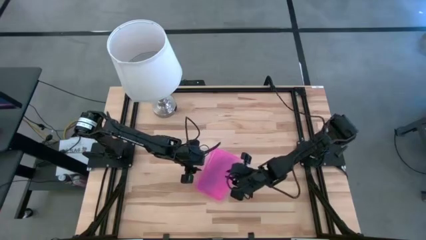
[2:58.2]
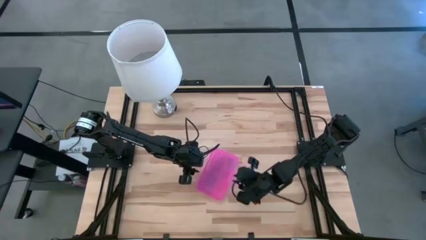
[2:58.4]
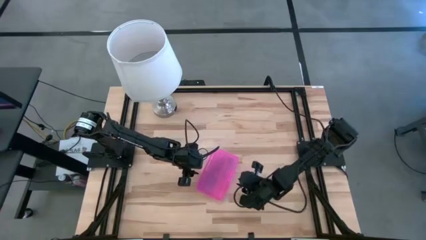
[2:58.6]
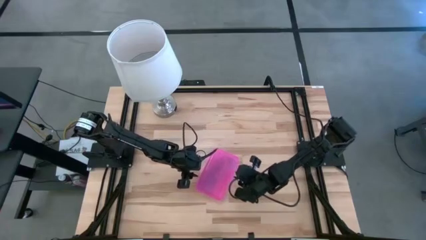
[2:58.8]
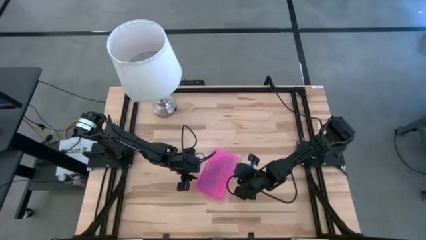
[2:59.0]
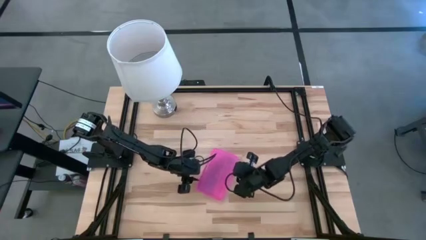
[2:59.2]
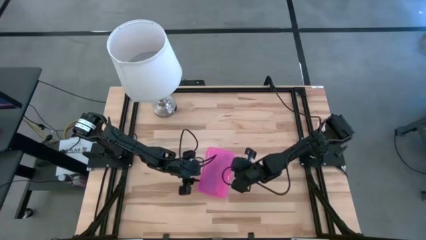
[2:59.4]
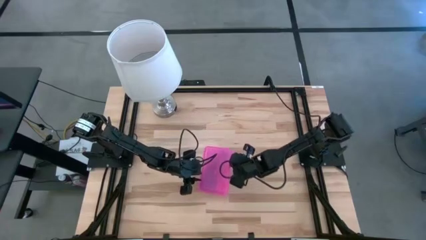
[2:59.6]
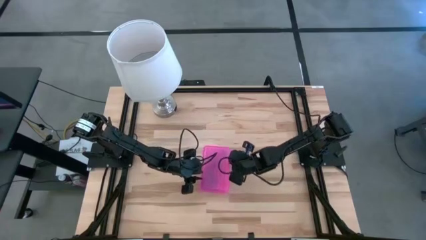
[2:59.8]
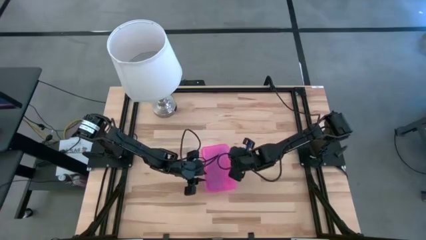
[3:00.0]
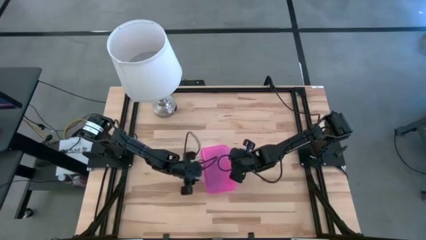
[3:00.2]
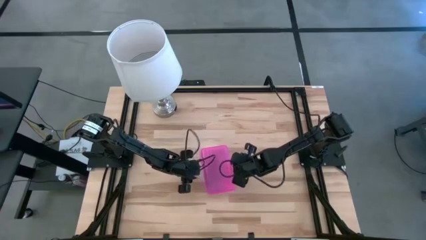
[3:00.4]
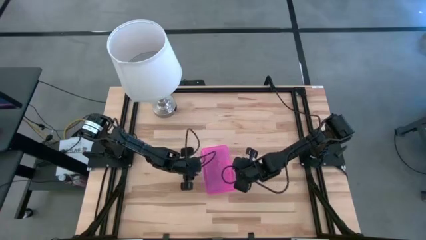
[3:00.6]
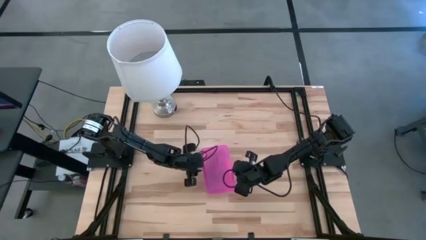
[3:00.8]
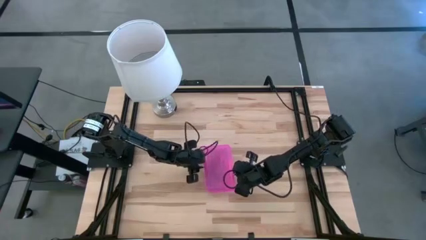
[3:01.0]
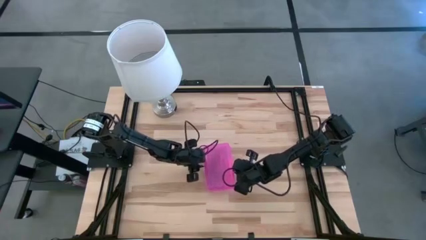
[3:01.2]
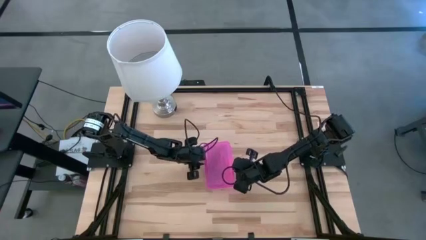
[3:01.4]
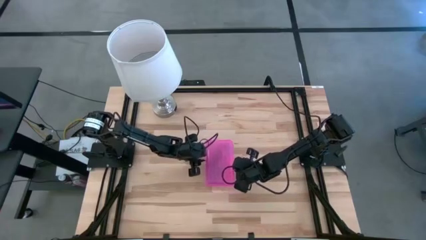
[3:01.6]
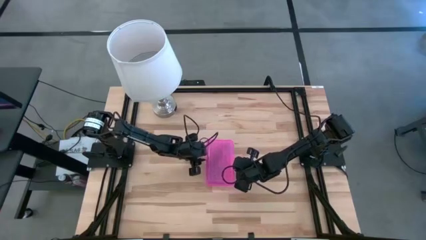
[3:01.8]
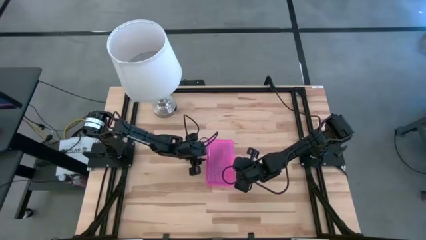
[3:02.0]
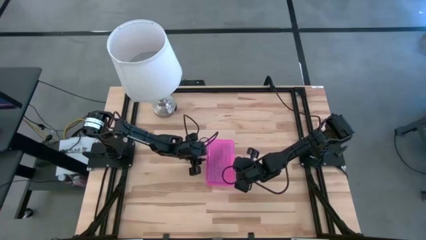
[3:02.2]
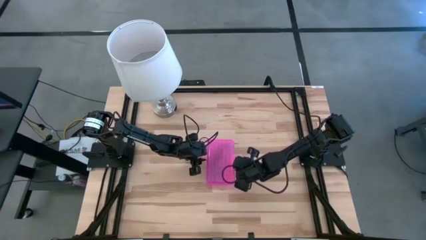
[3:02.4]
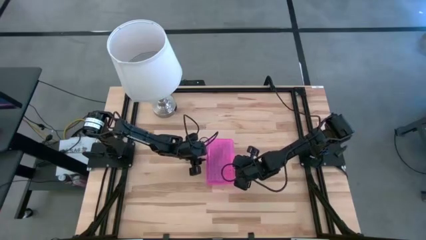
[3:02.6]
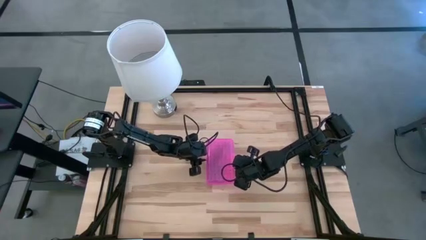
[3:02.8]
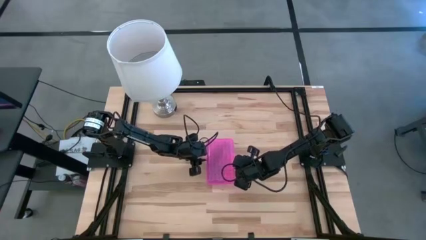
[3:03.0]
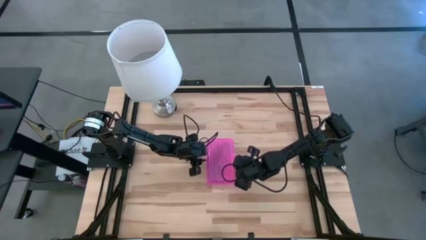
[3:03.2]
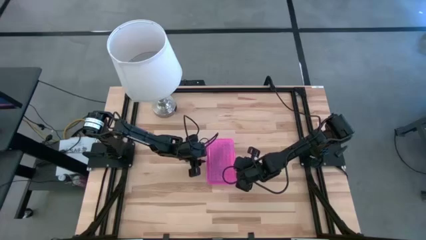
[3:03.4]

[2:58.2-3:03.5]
Task: Pick & place school supplies into a supply box
Adjust the pink supply box on the table

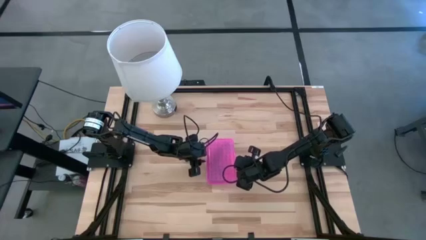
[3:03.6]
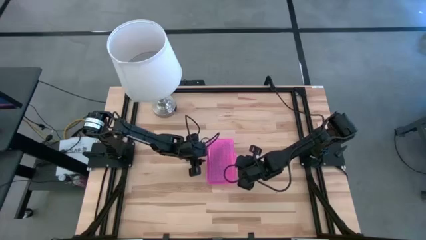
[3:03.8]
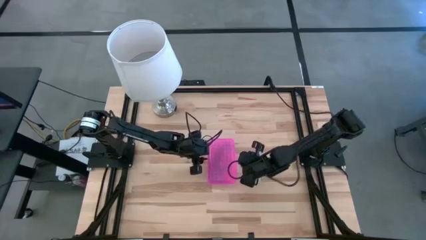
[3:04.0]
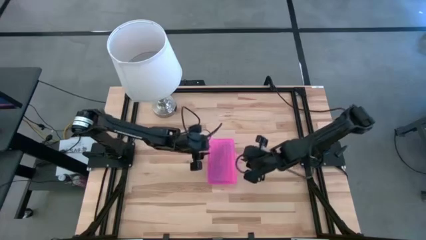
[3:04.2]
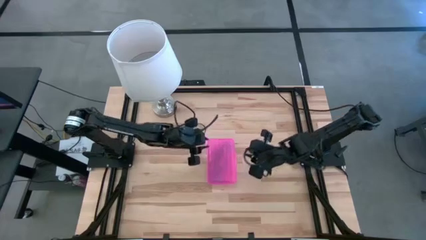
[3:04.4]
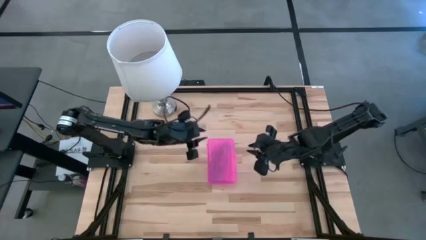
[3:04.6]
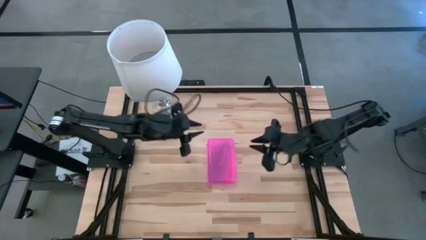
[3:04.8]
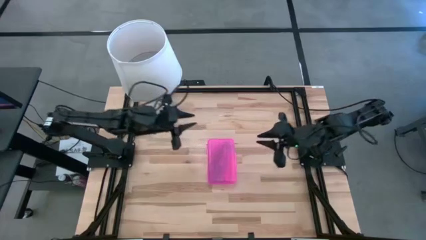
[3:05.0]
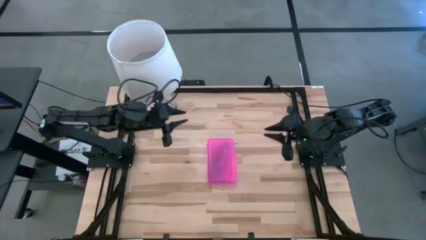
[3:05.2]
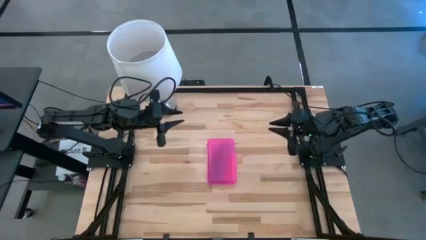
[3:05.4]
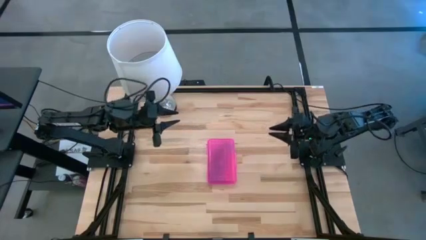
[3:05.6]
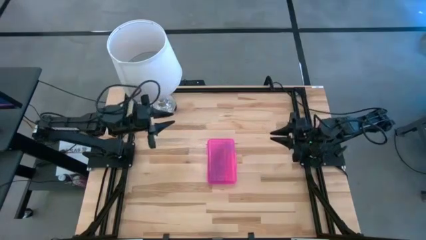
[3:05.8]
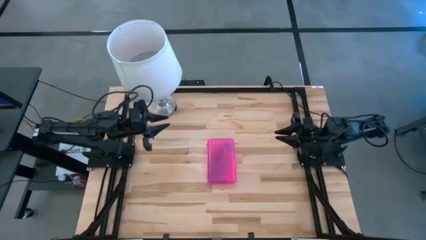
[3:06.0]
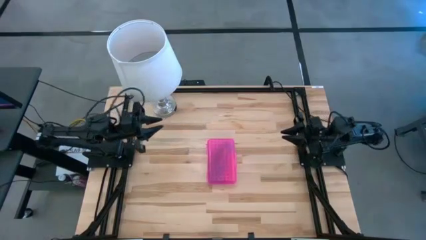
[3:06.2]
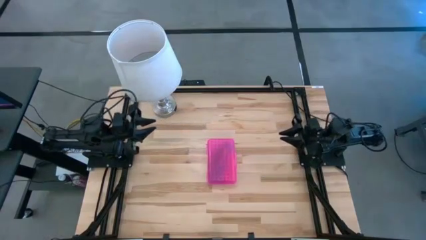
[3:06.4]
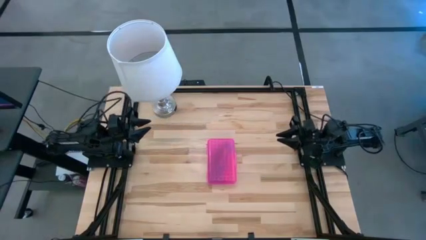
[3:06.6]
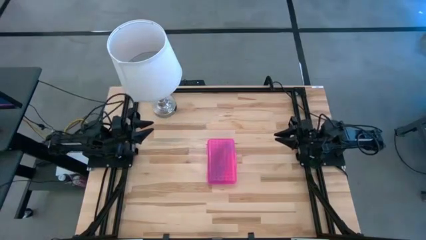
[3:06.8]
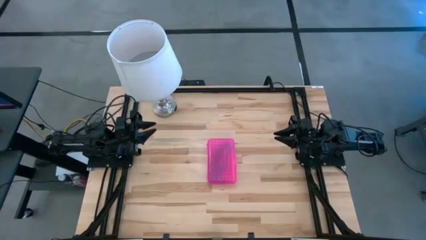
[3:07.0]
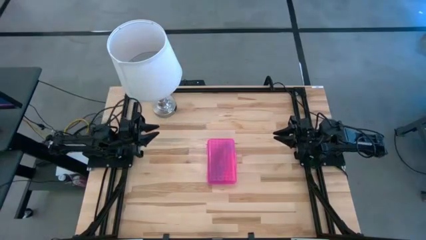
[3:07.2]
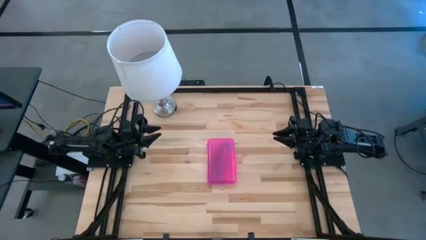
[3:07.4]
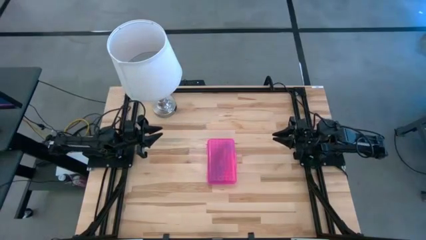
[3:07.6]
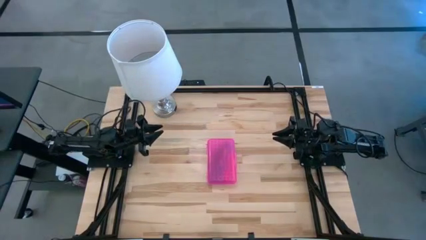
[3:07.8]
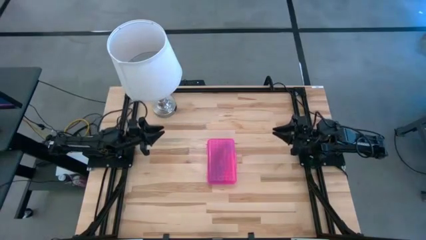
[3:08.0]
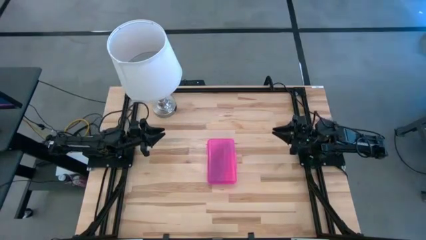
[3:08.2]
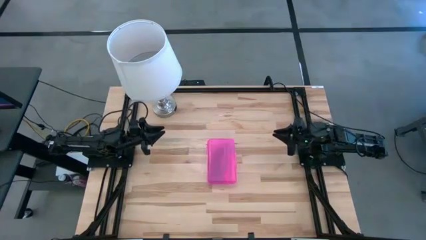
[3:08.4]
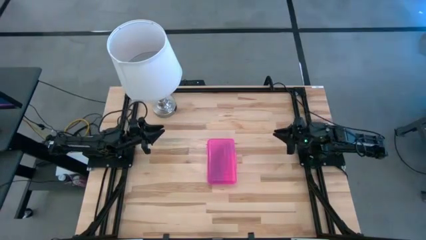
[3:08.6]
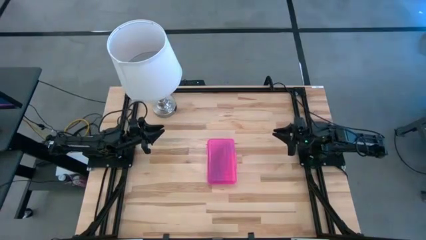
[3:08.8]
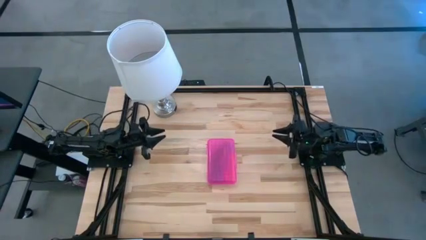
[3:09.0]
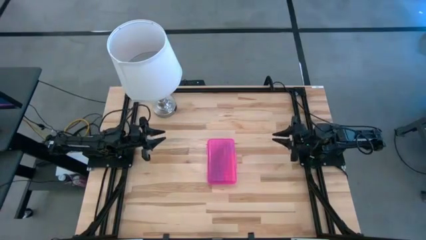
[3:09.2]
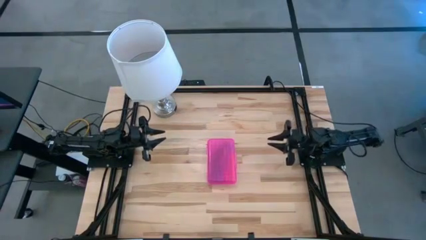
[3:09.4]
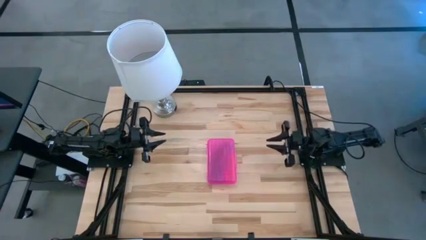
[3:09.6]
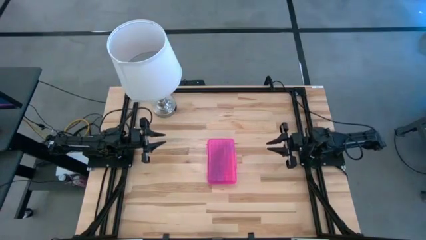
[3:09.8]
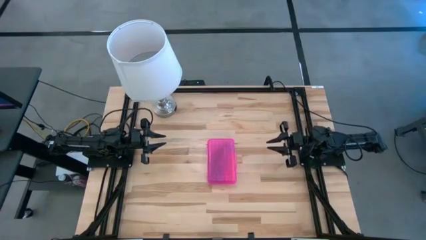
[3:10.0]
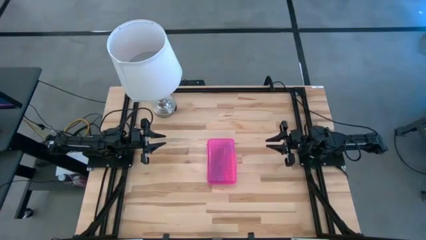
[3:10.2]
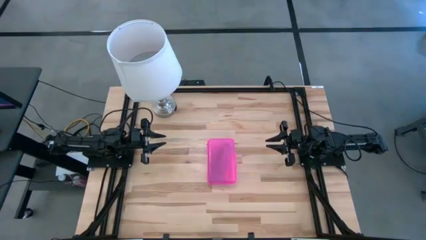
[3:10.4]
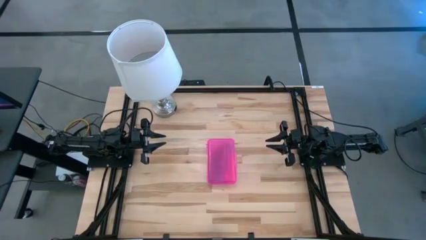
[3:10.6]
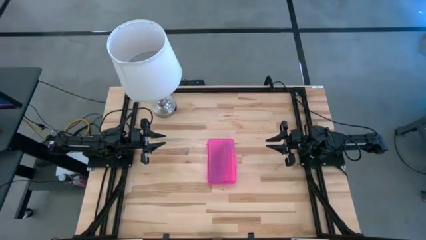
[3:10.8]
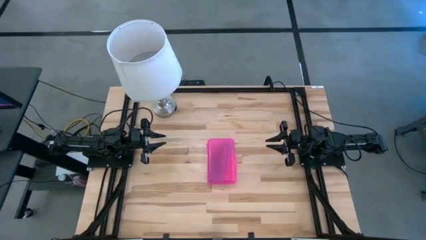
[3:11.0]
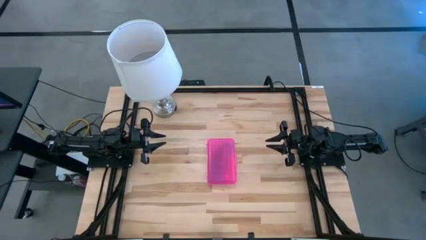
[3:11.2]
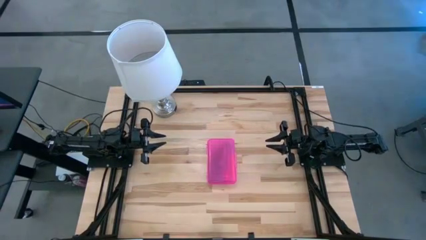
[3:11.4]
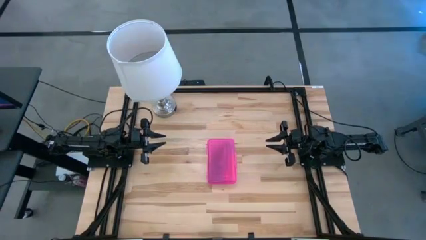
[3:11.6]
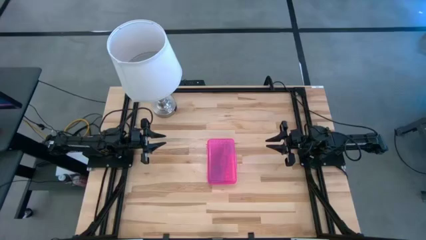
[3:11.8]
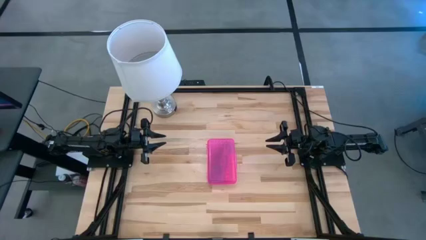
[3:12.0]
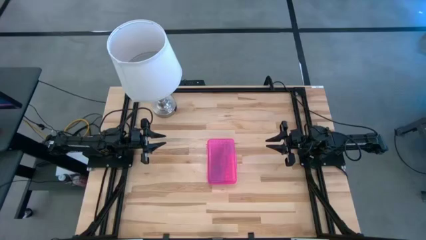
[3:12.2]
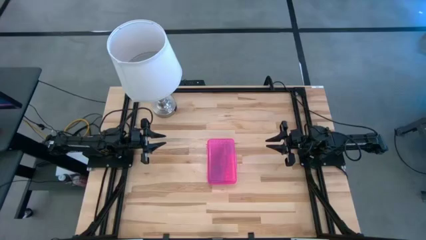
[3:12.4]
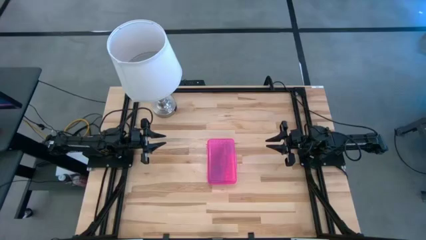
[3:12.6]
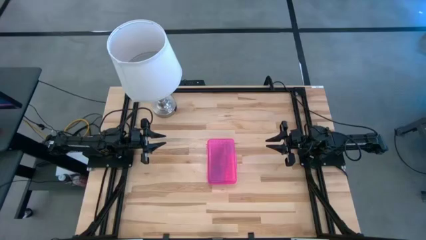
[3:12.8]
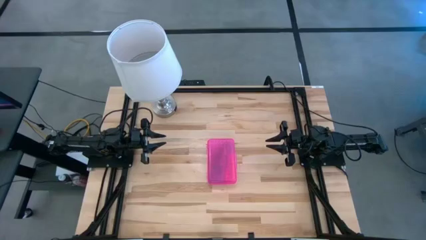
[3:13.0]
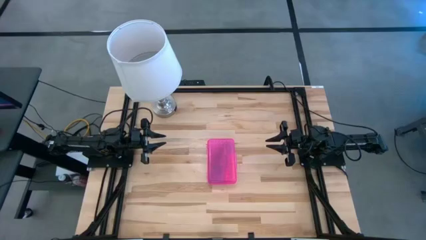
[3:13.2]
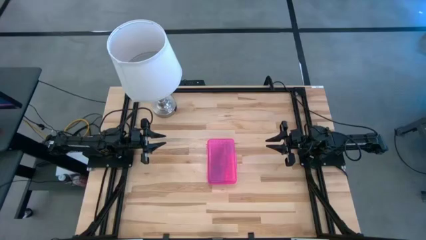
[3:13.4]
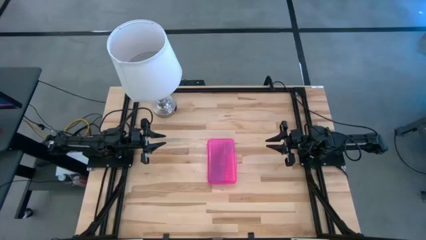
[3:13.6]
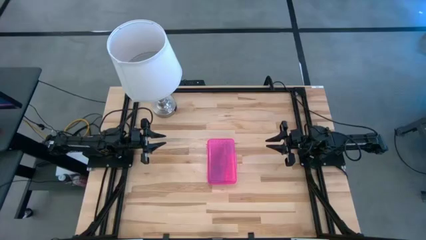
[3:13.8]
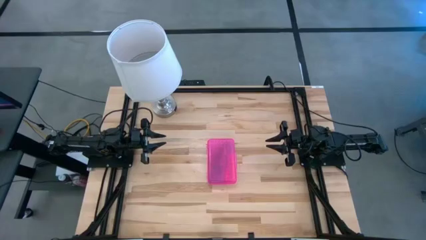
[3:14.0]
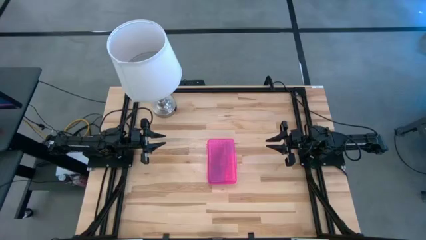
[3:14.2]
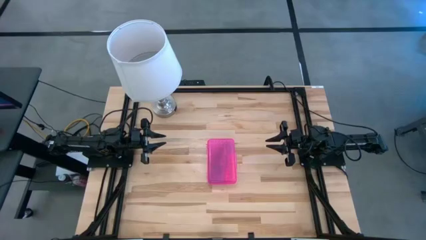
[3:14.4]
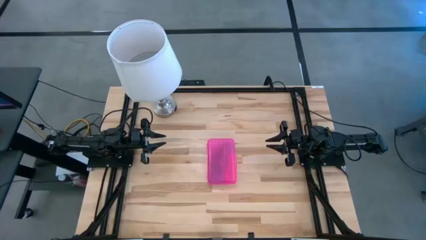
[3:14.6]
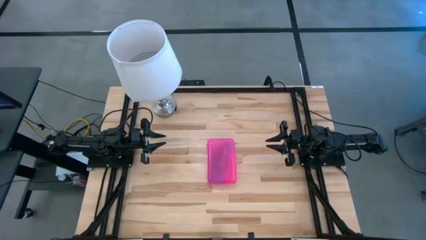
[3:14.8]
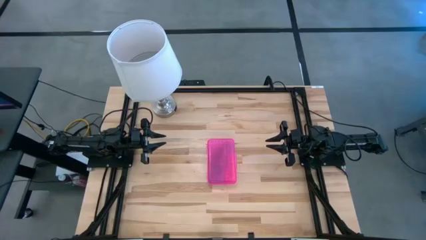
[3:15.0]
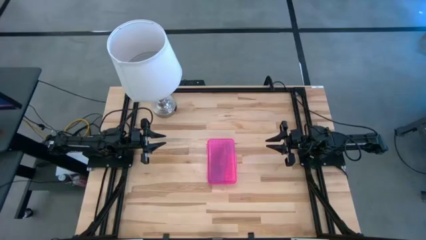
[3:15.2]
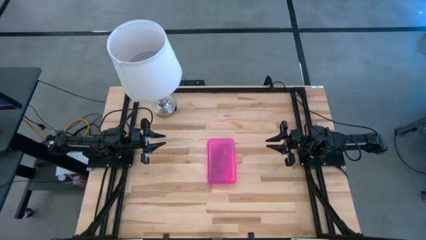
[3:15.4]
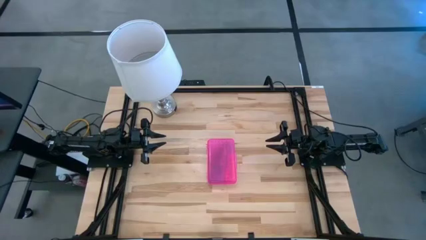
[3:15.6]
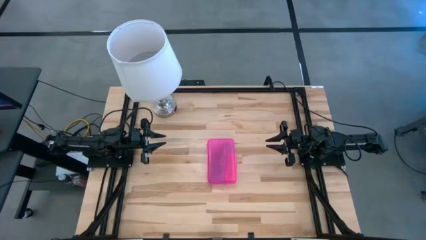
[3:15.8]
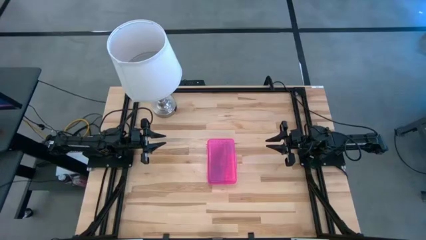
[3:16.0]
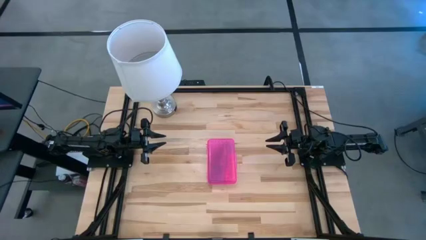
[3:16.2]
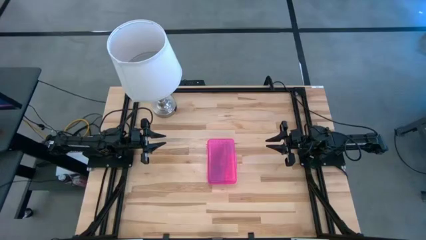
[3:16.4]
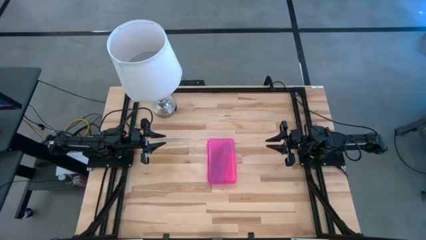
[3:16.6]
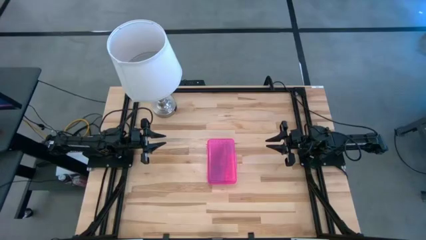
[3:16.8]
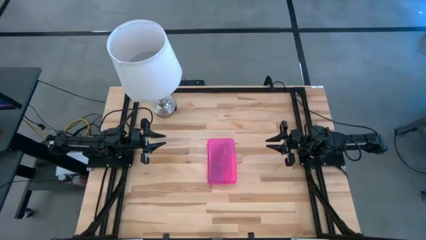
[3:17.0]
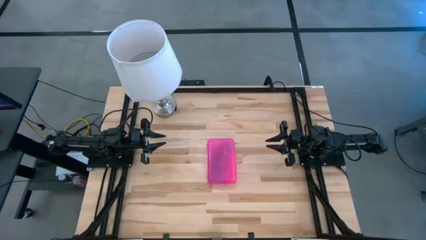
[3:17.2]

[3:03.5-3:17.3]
Return to Home Position
